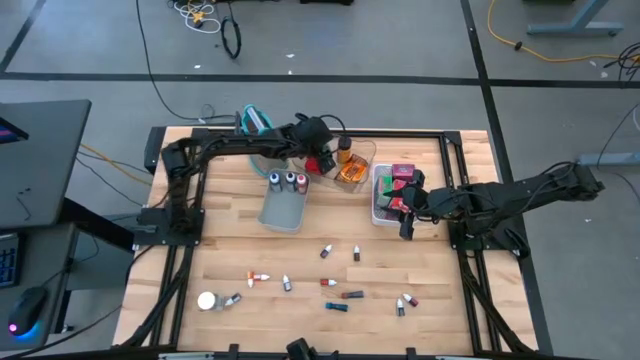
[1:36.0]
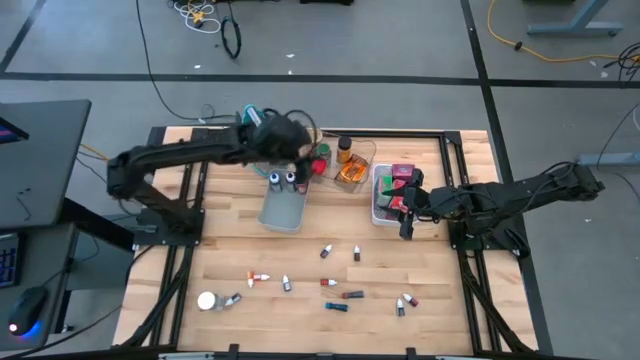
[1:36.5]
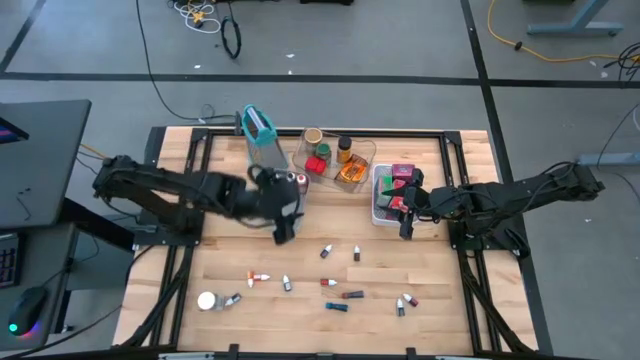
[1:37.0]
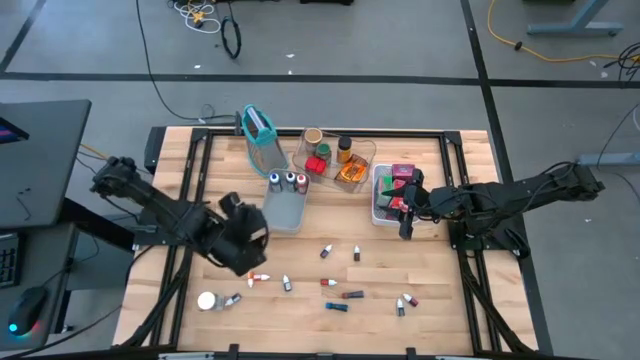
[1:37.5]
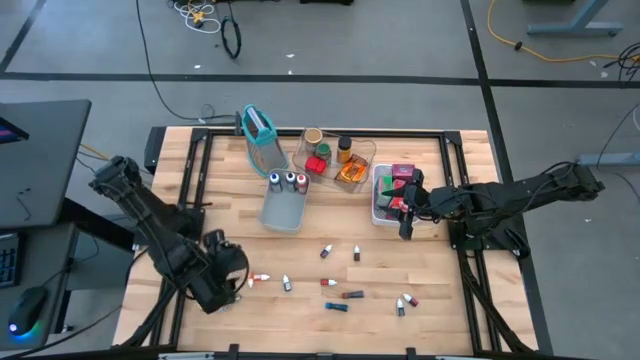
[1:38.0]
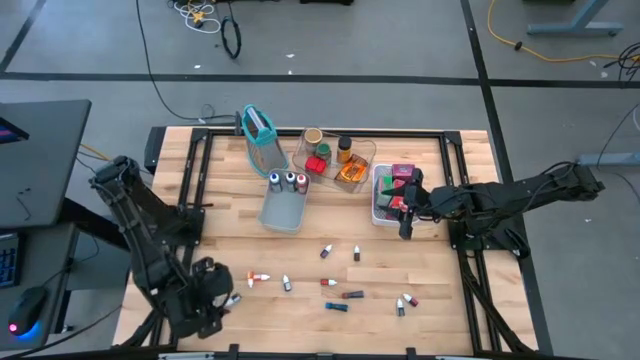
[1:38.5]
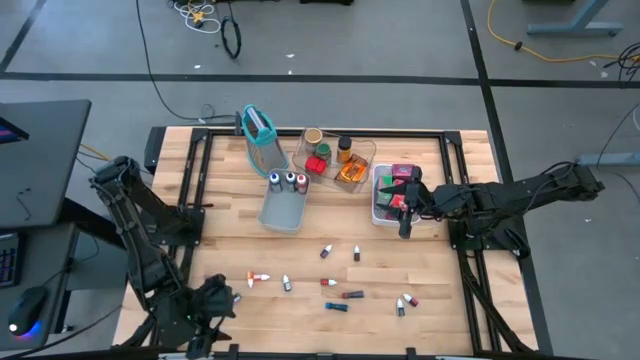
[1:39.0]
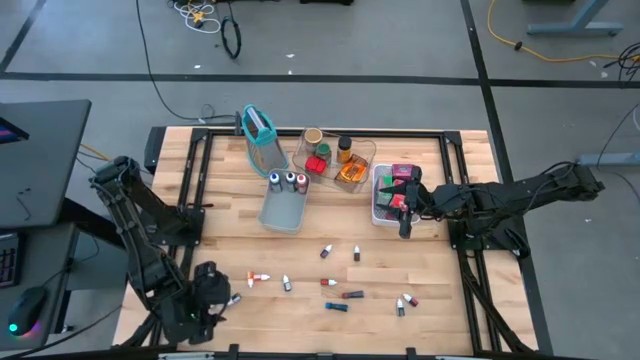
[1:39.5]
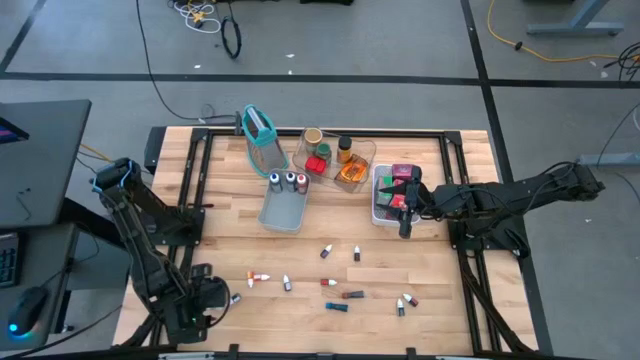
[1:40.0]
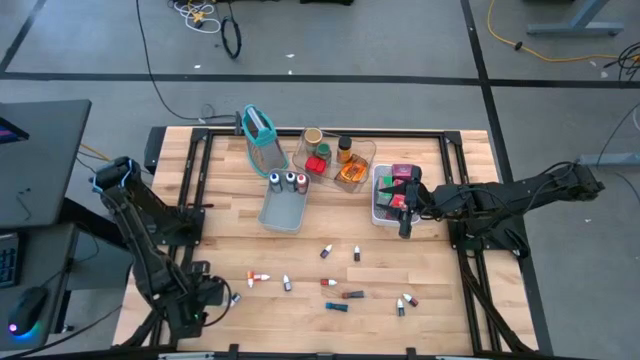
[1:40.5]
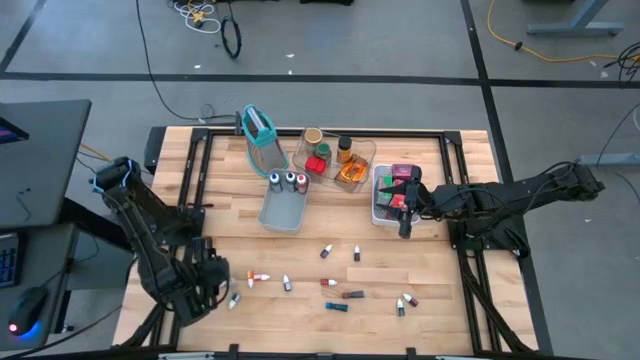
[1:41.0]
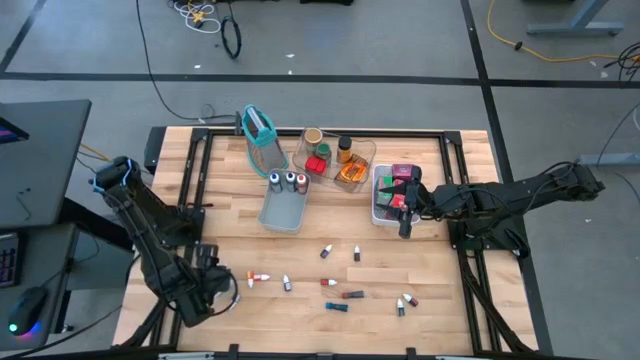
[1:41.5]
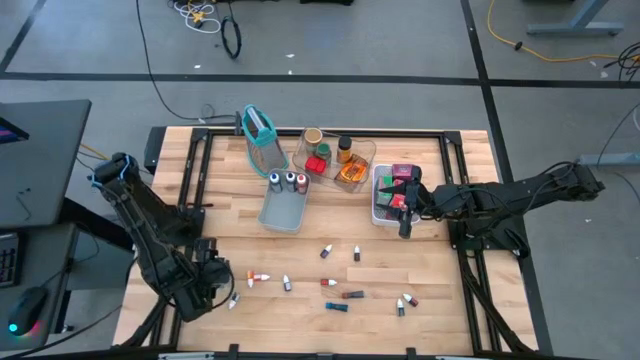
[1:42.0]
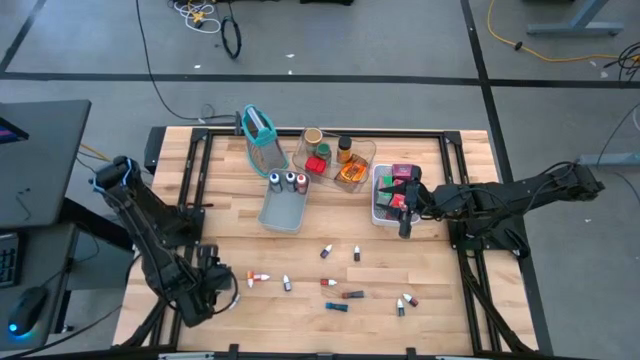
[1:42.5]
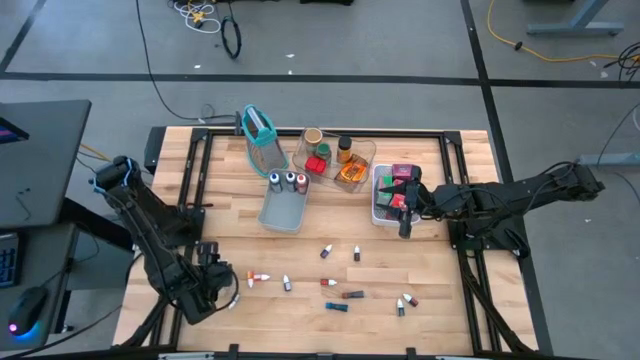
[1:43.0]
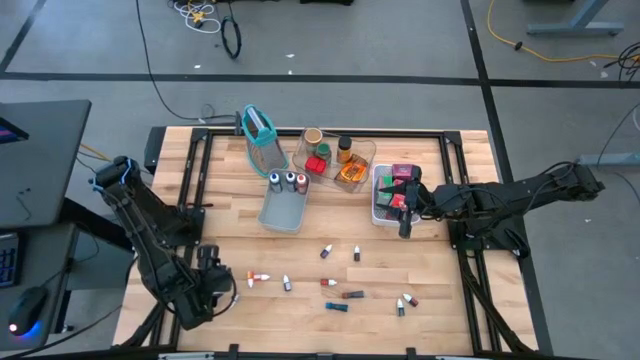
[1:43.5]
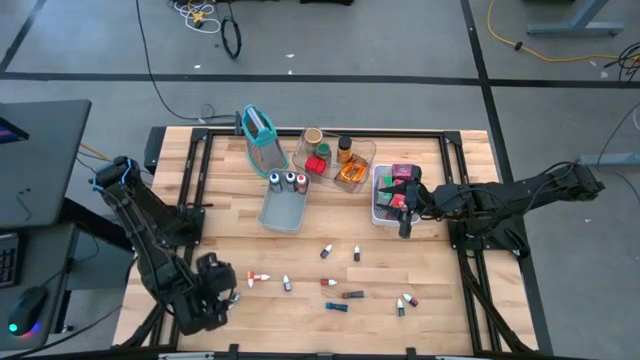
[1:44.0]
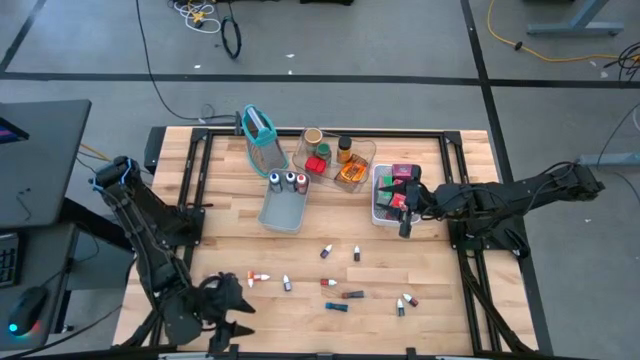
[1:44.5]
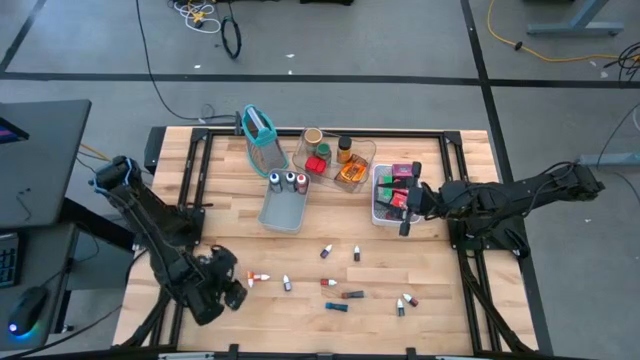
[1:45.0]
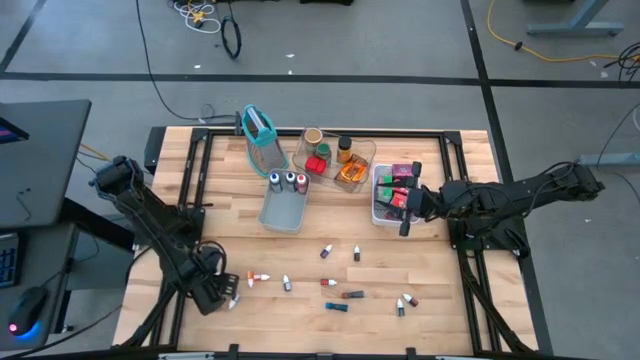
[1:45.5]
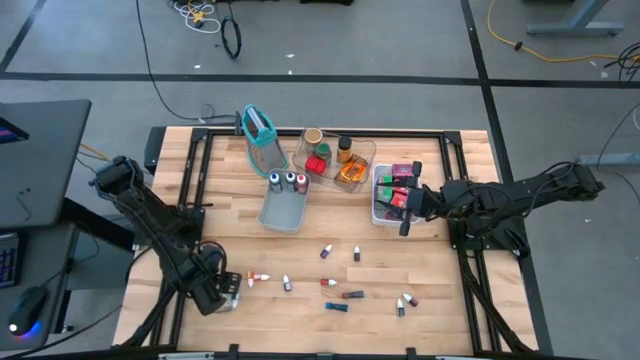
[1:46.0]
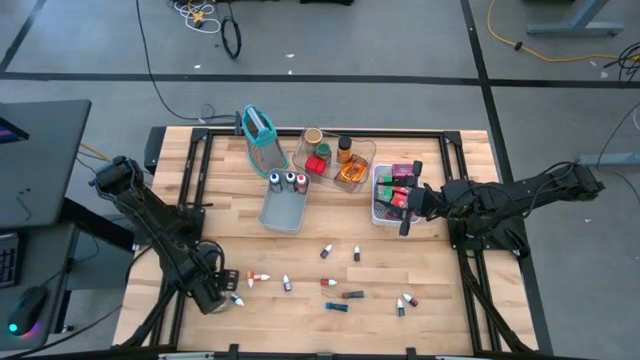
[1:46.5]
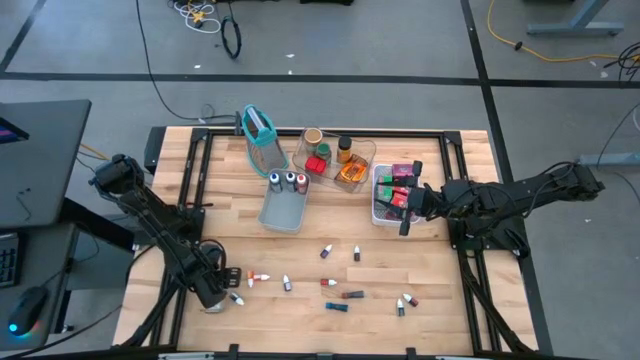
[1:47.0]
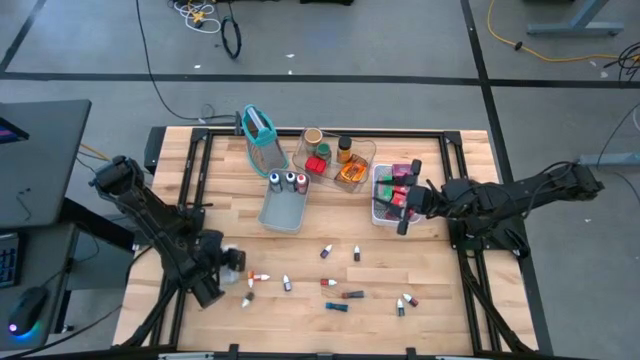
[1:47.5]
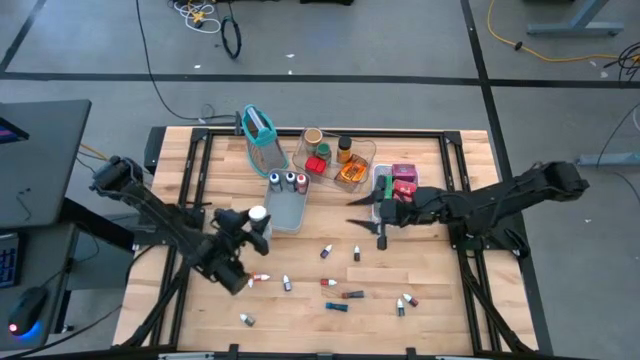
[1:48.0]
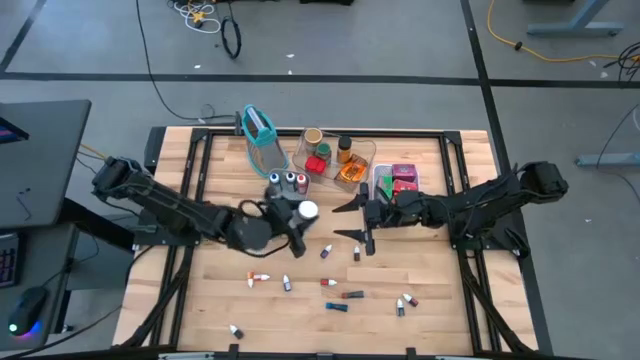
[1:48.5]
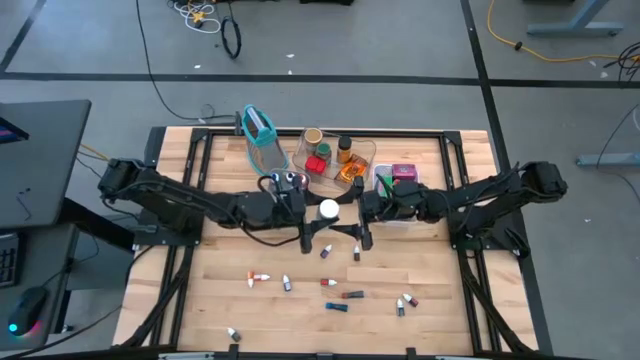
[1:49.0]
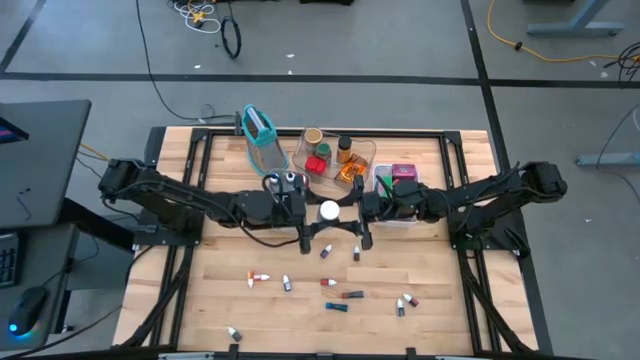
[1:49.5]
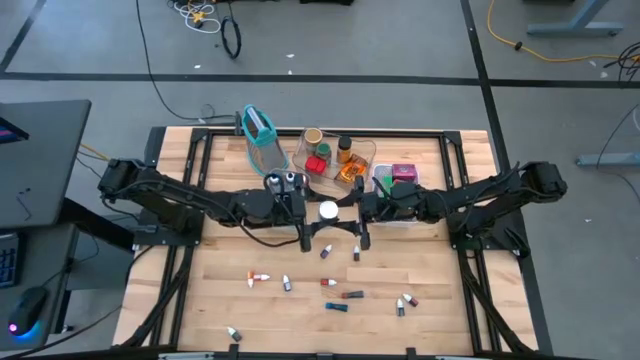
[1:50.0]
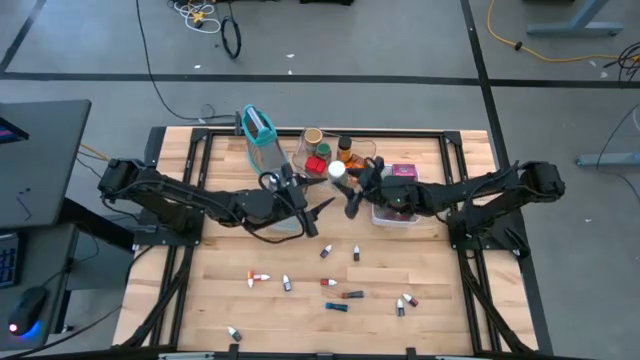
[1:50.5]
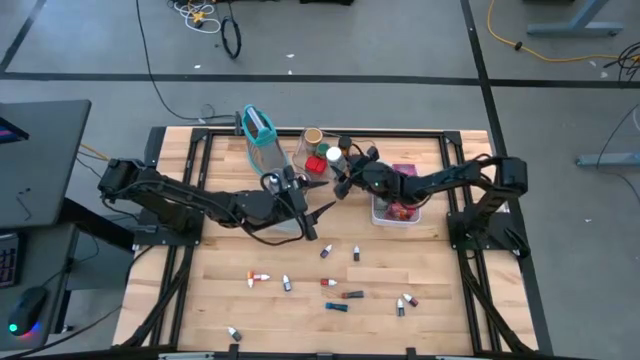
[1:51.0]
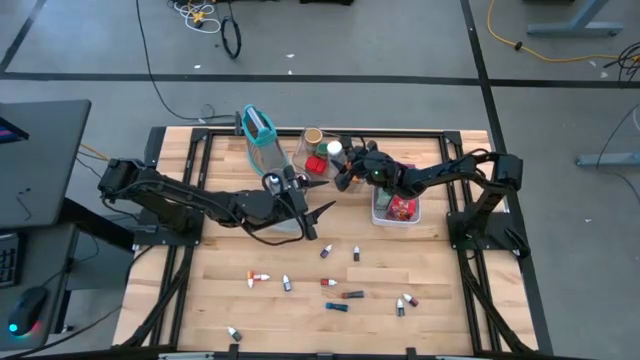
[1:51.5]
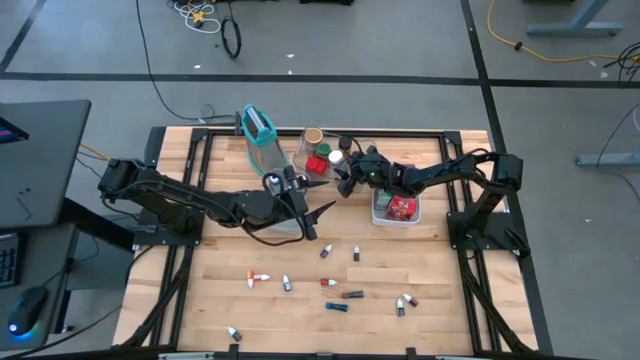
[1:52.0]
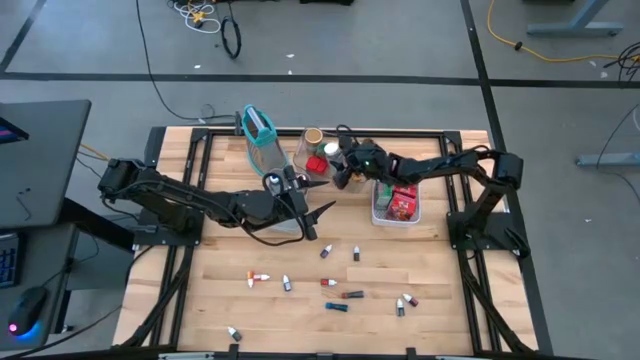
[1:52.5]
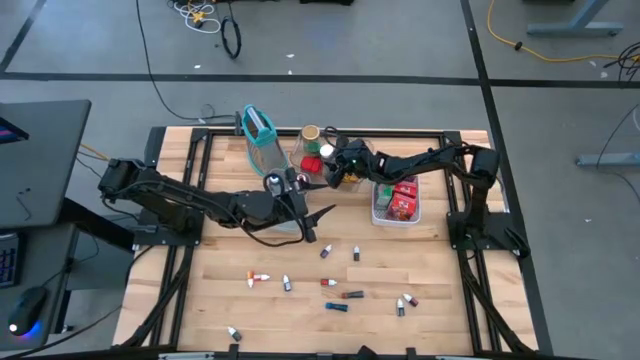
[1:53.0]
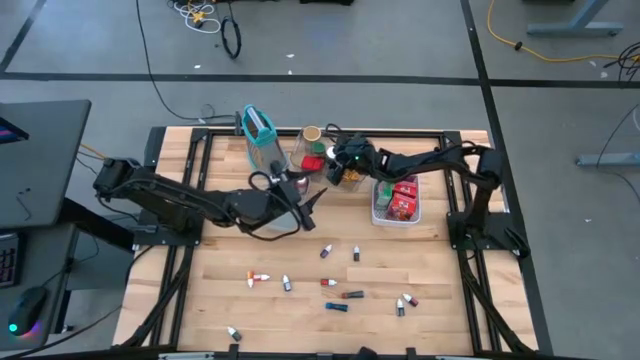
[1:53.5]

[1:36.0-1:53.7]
Task: Pick & Place Kitchen Items
Put the white seasoning bottle into the transparent bin

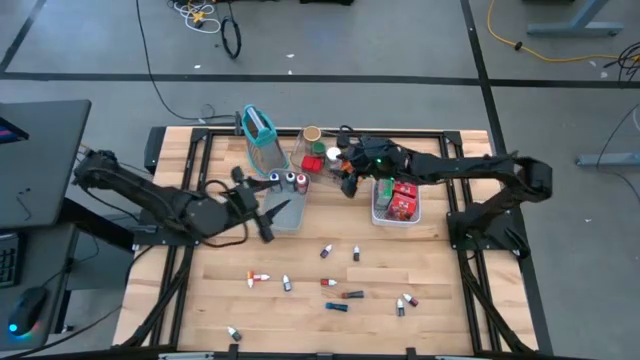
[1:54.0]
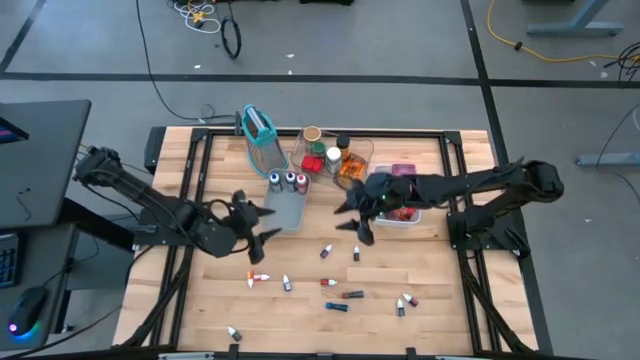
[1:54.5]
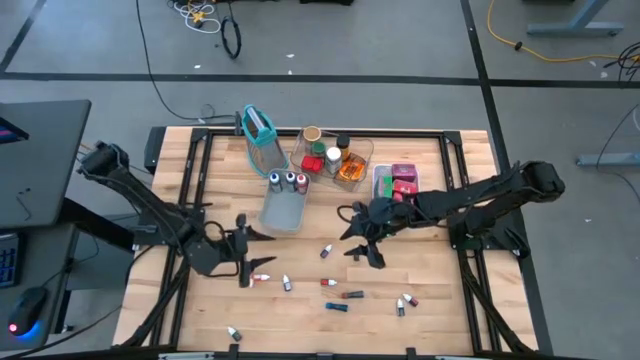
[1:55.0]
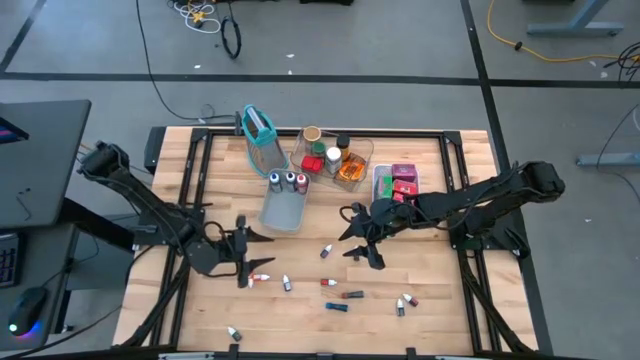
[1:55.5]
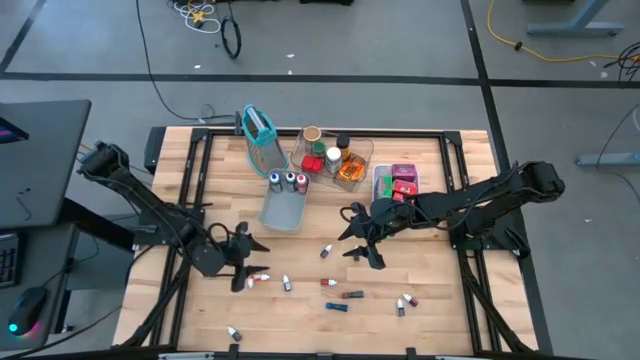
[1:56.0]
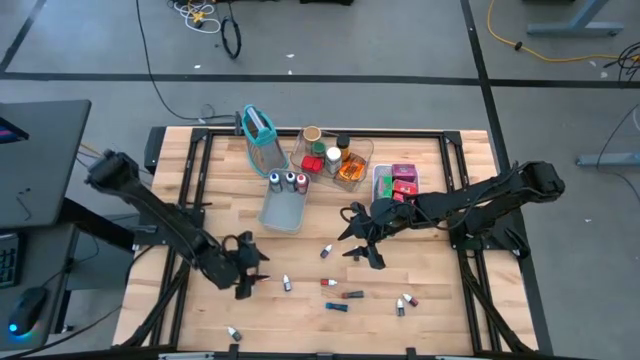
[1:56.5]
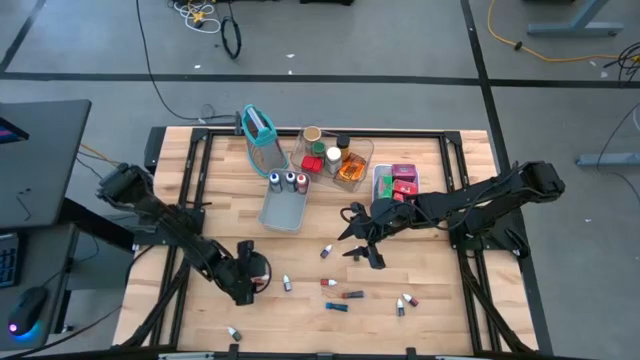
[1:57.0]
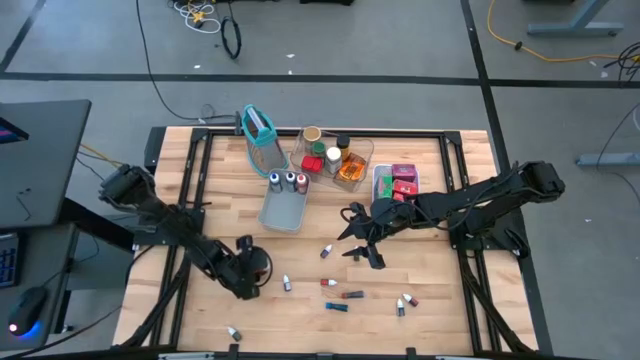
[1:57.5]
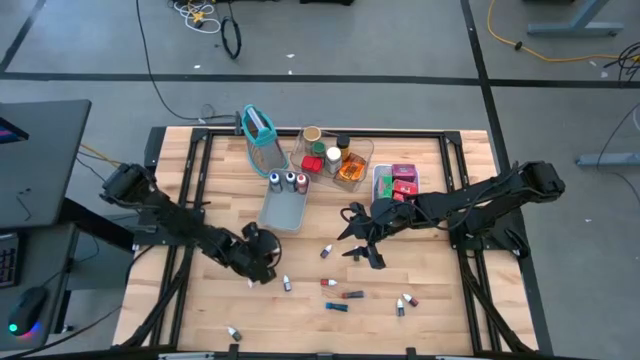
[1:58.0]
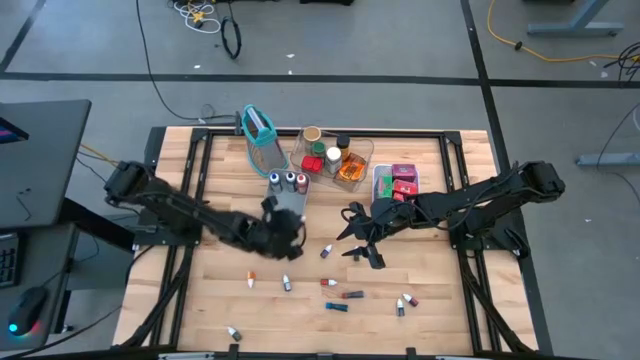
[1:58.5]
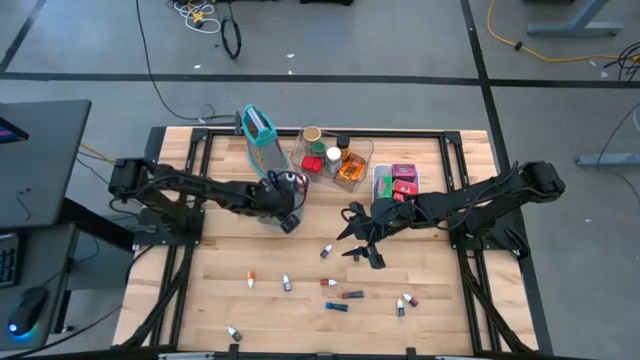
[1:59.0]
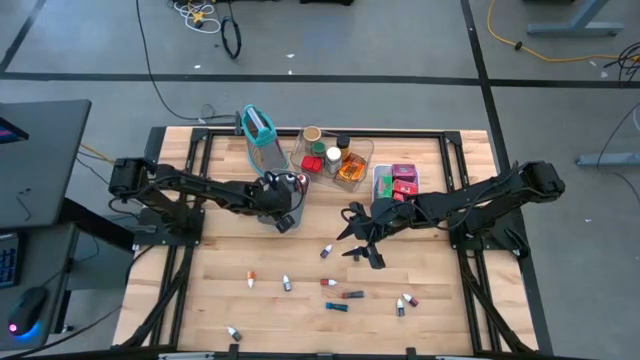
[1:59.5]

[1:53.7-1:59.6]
Put the small orange food coloring bottle into the gray bin
